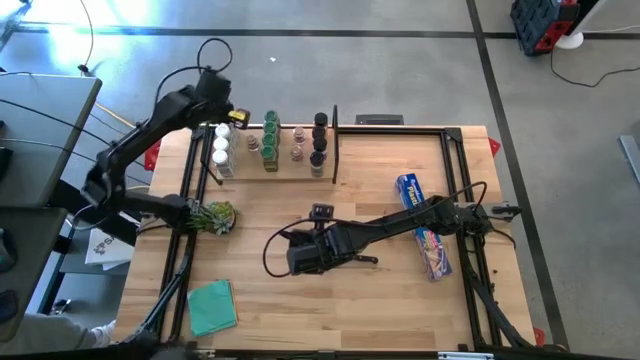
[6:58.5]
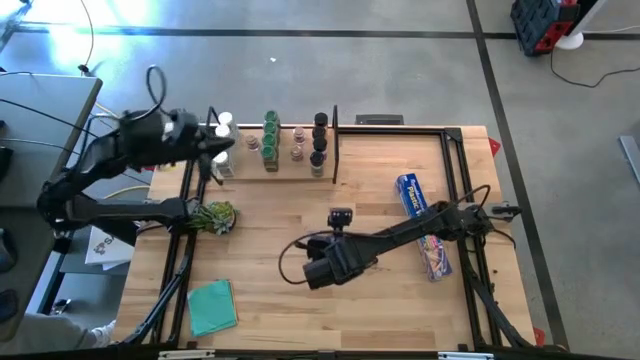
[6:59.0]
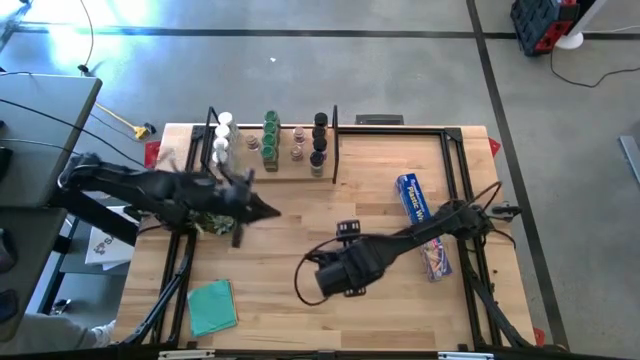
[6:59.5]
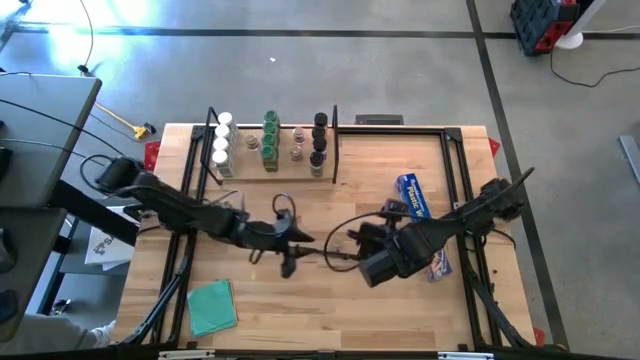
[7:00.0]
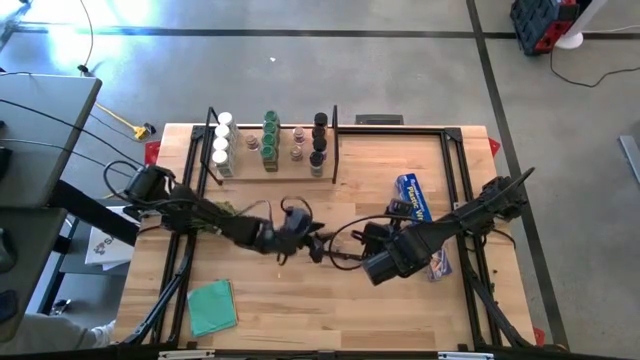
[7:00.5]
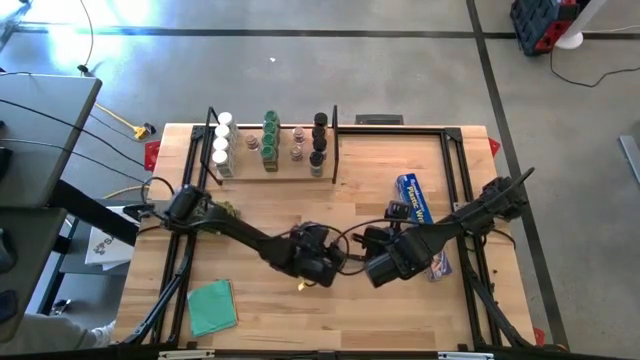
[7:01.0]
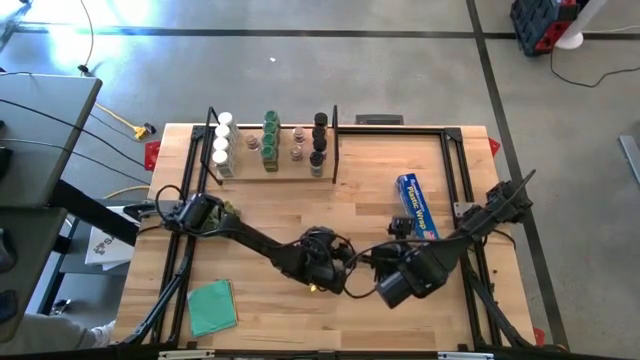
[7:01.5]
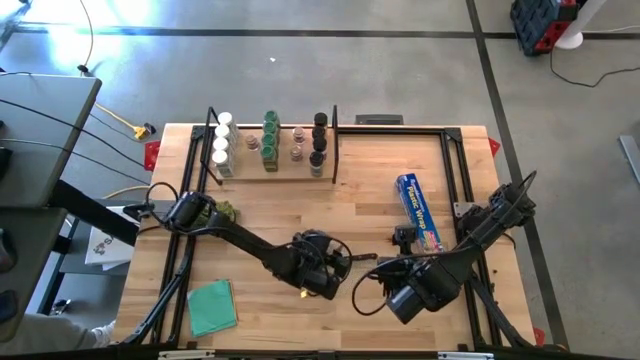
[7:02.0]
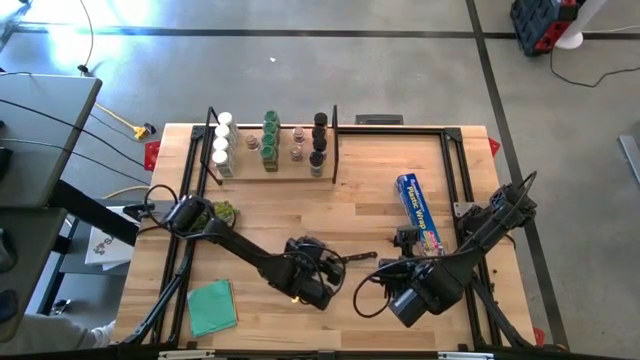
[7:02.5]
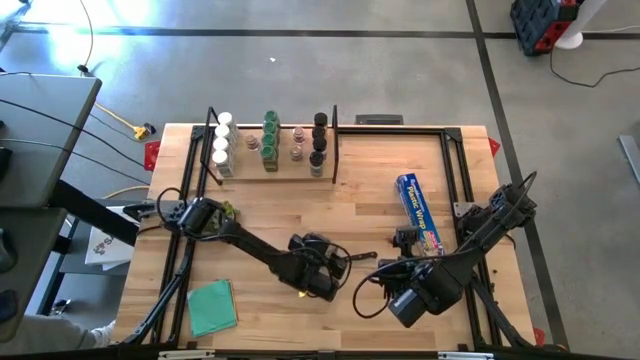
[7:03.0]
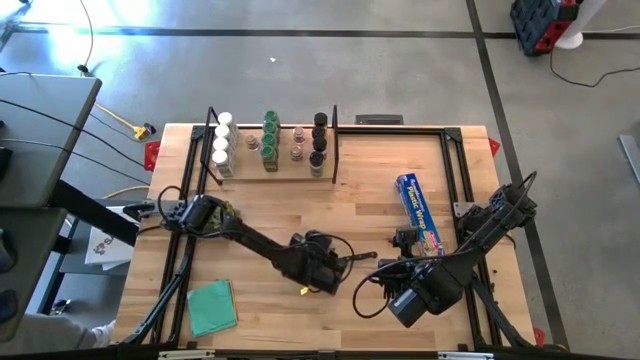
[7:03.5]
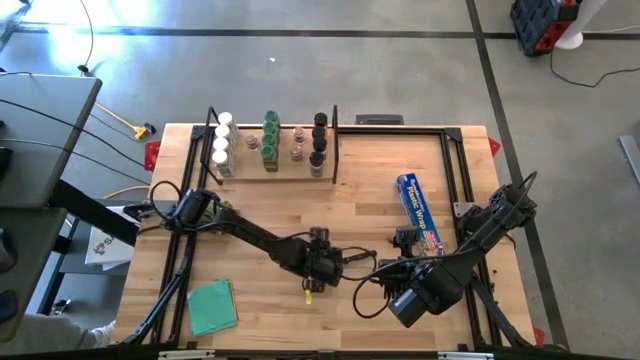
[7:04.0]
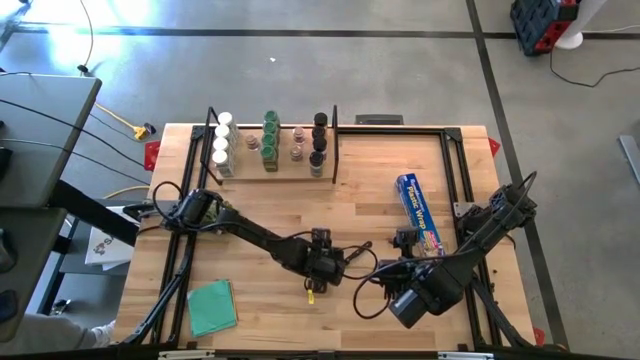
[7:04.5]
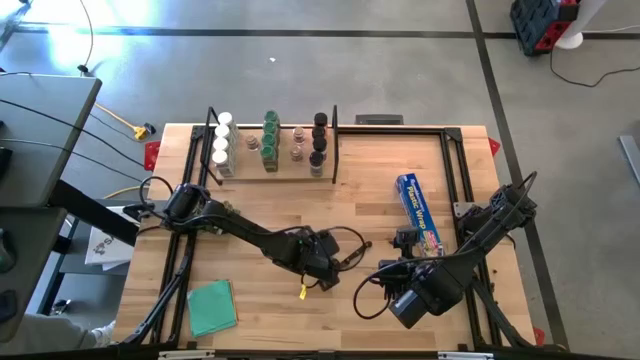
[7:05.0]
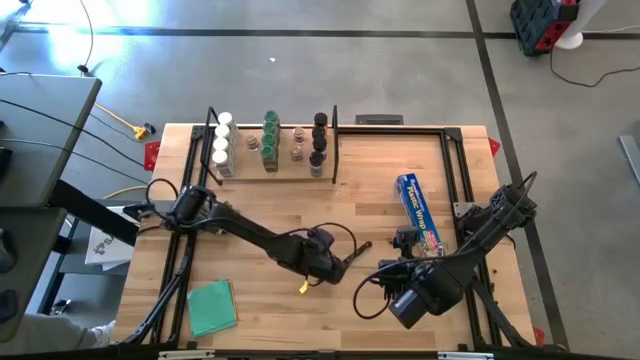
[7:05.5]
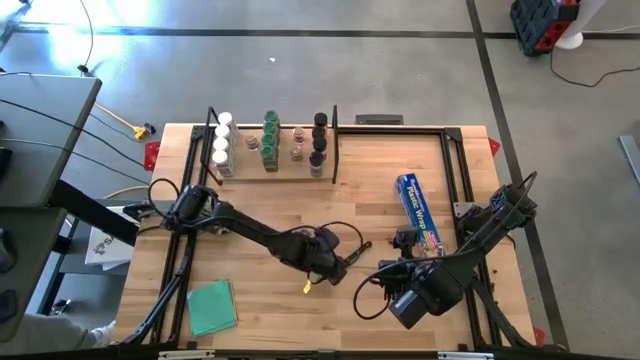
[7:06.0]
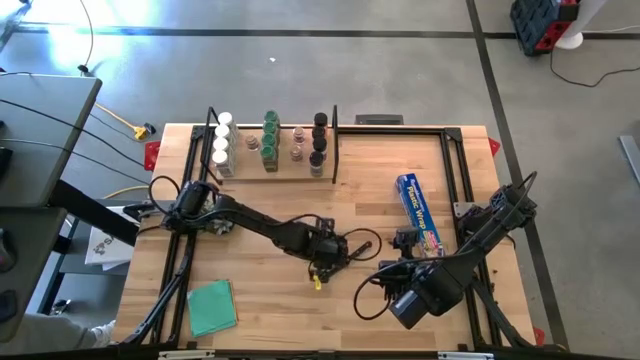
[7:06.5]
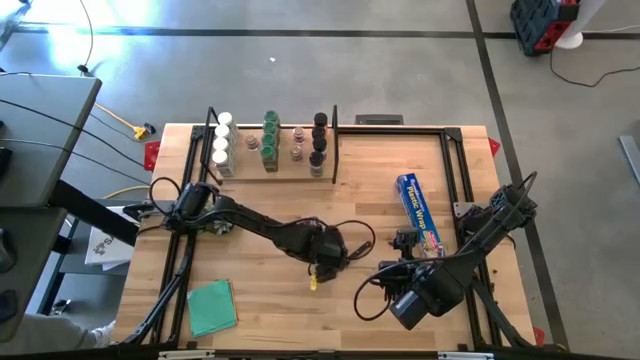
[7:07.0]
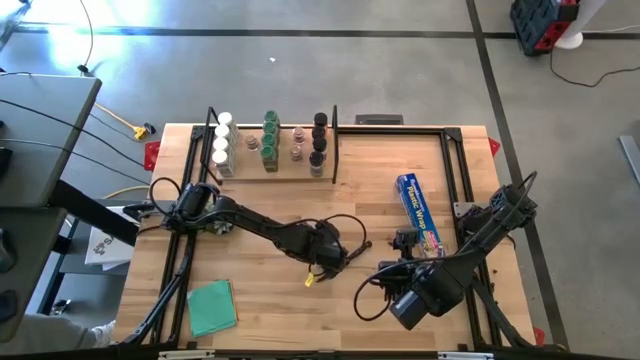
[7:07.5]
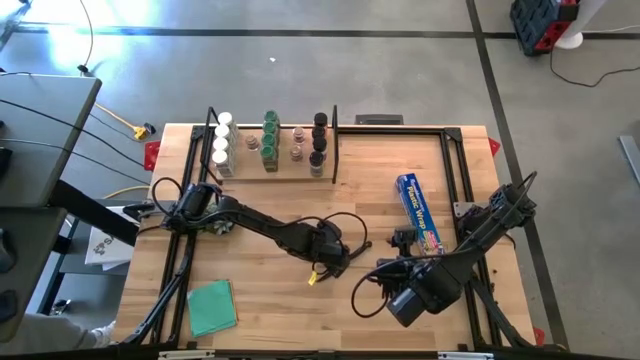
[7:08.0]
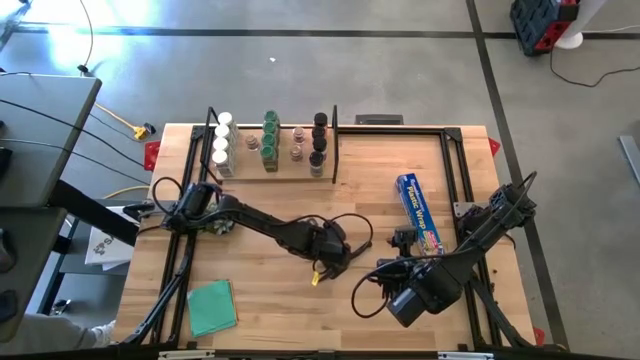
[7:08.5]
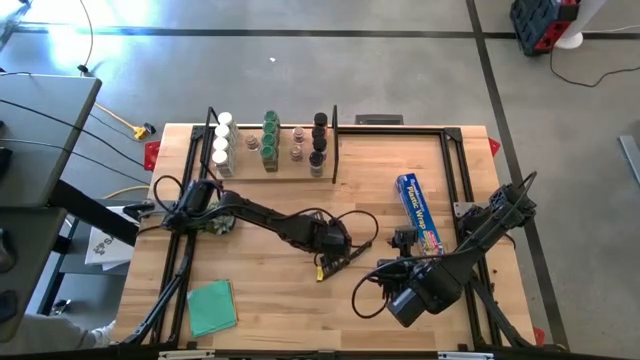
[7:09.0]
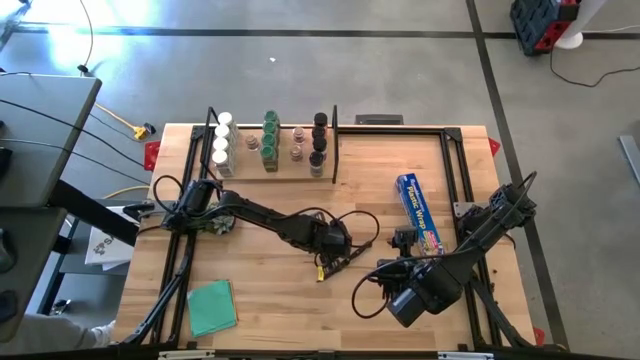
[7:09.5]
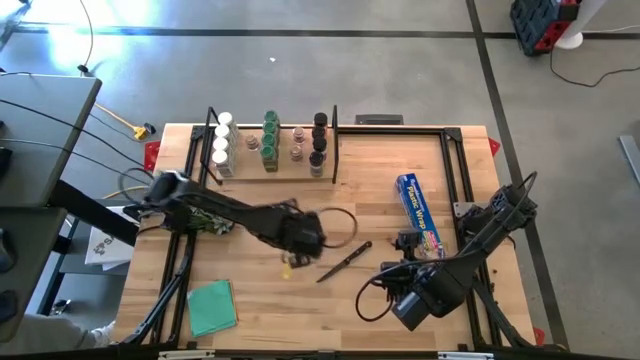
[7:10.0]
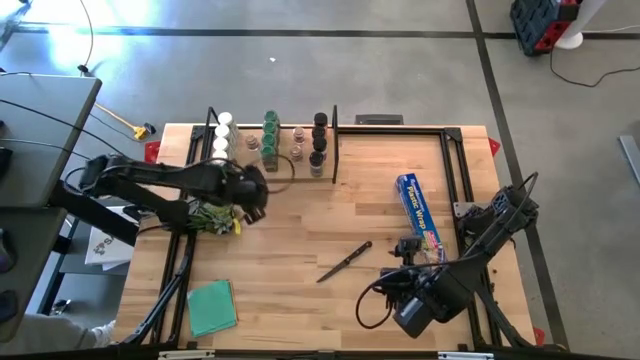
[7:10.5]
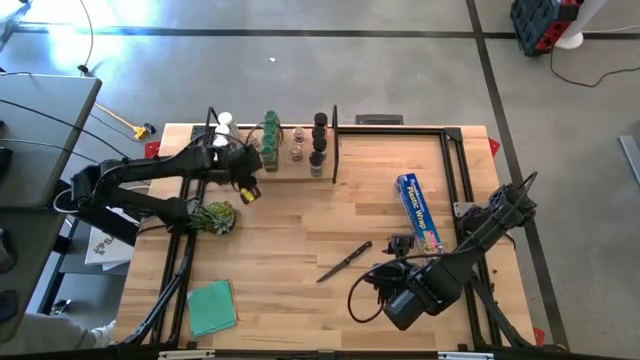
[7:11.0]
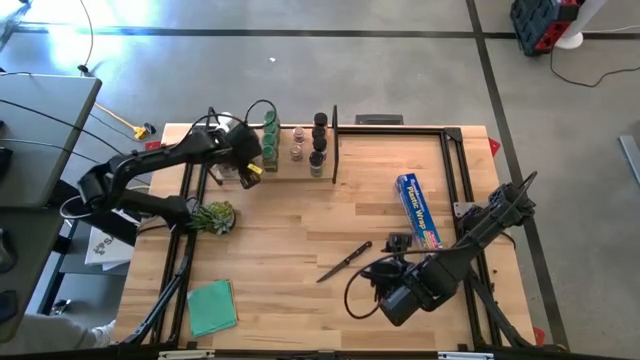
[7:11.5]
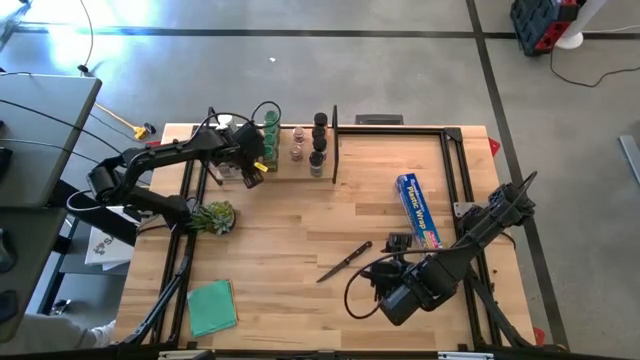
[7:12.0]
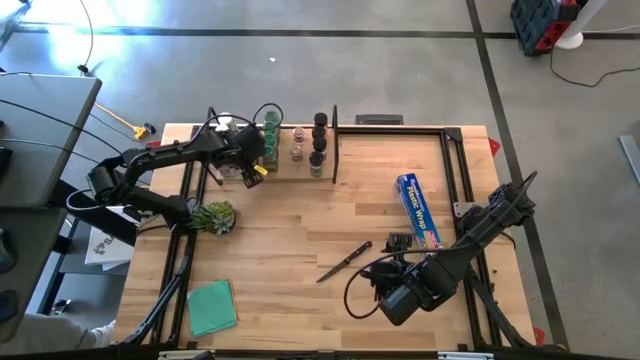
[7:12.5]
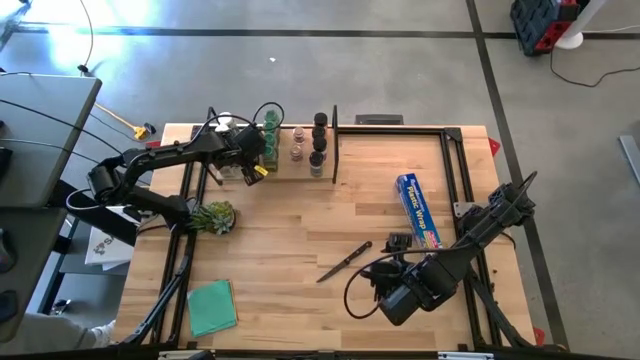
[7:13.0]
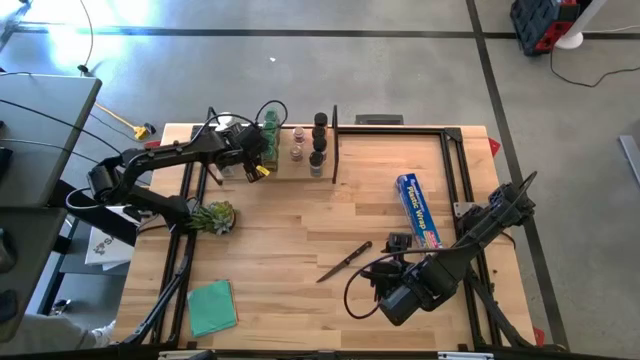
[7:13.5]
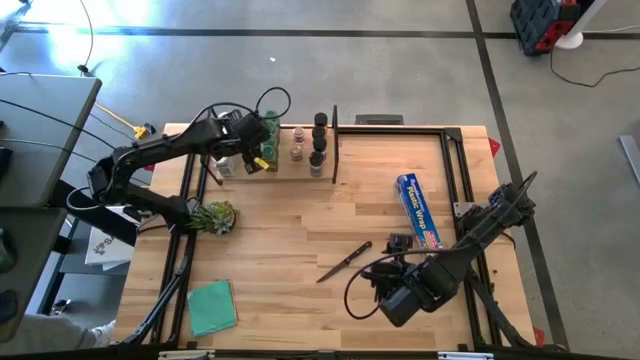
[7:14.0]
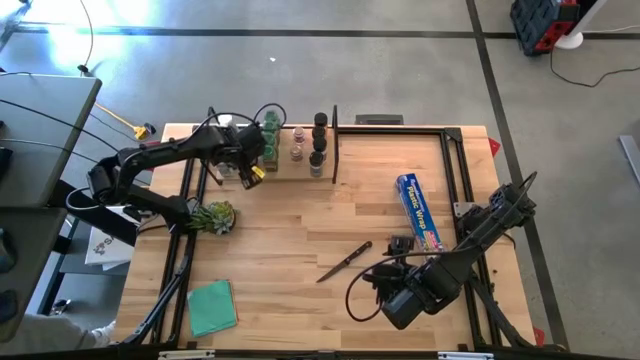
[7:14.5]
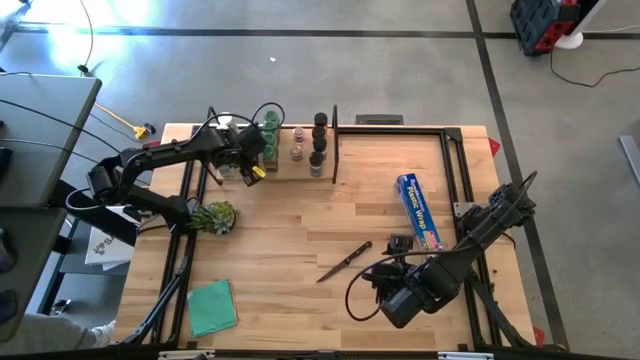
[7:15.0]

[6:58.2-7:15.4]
Task: Shelf spices
Put the brown lid seasoning bottle on the shelf

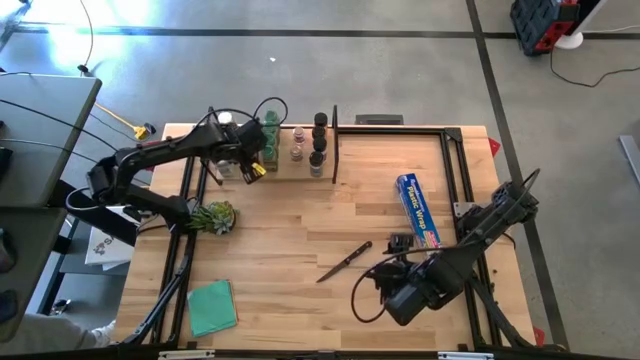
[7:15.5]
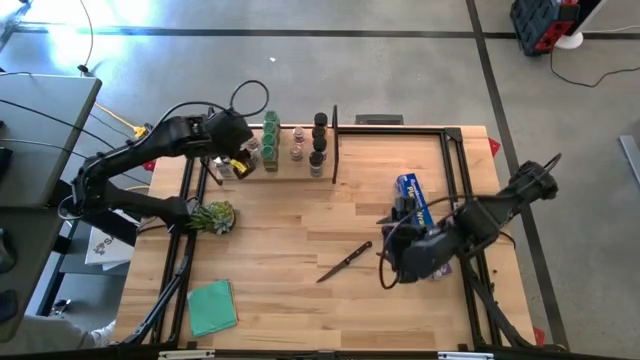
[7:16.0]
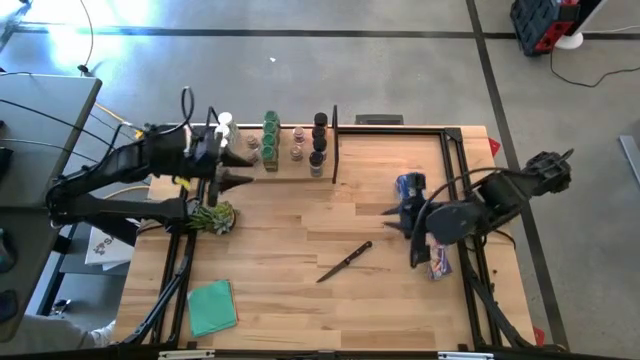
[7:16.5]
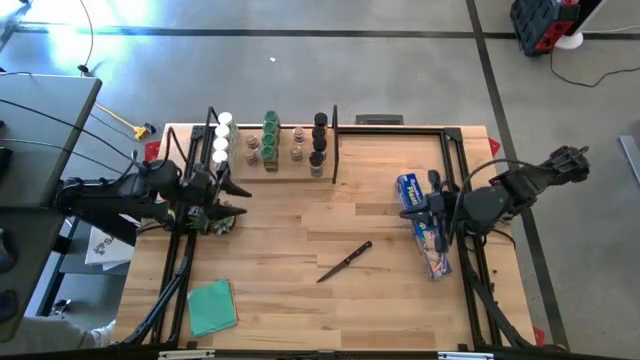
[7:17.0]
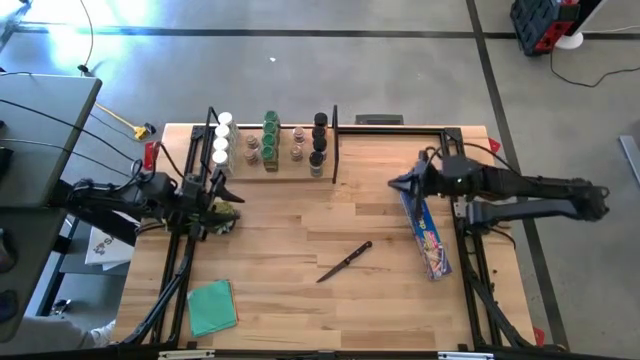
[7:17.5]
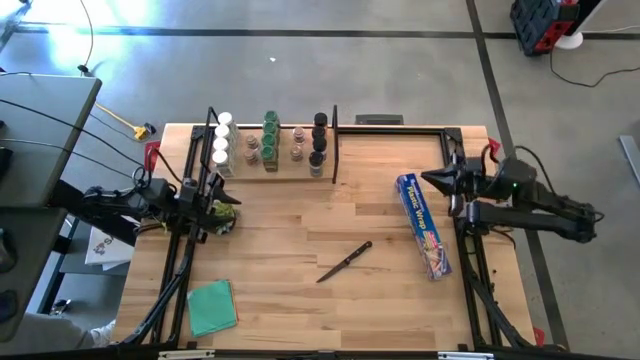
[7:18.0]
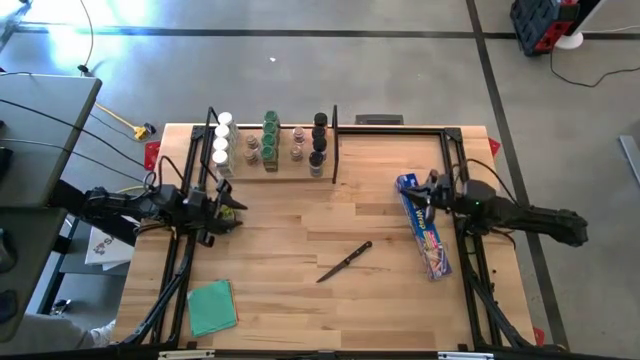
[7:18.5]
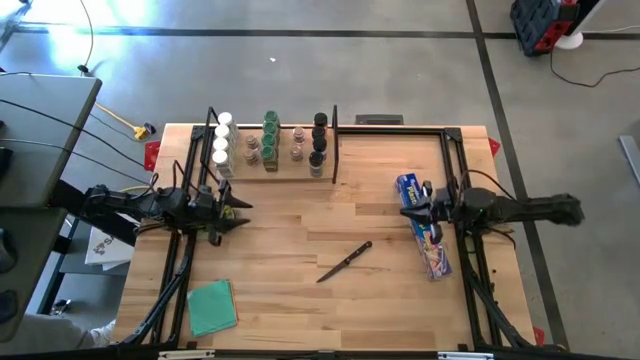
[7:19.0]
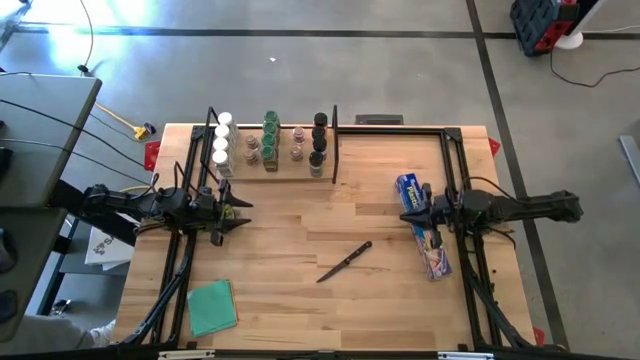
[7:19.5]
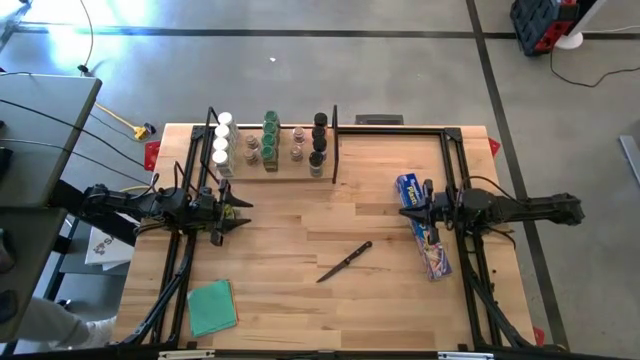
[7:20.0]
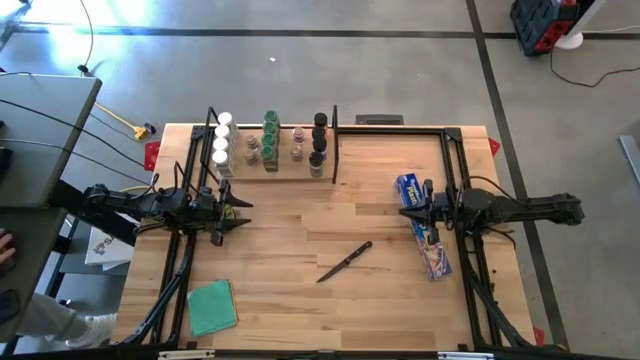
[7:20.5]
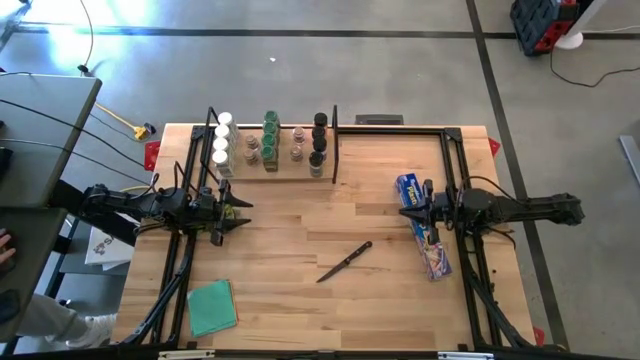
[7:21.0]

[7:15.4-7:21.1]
Return to Home Position
